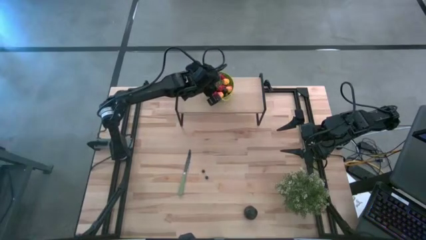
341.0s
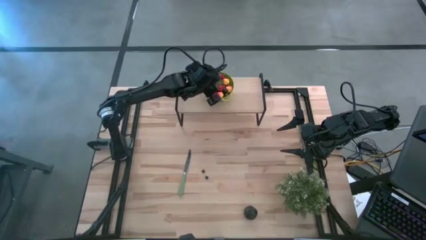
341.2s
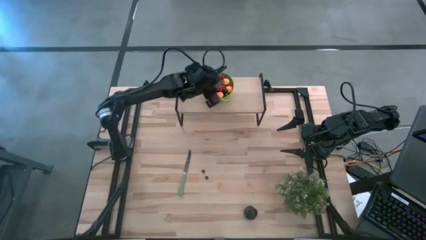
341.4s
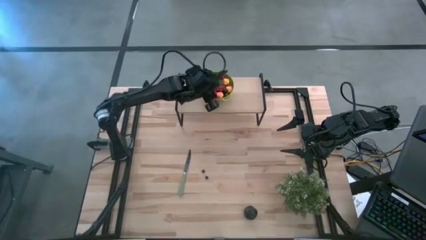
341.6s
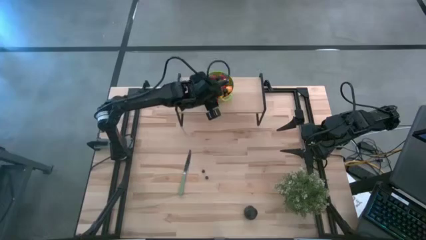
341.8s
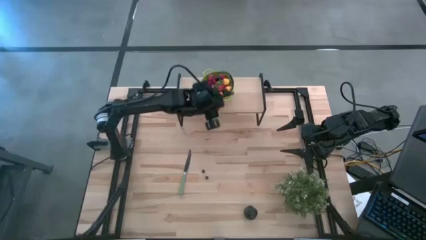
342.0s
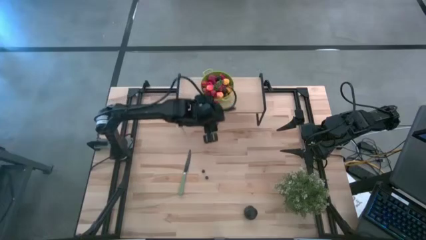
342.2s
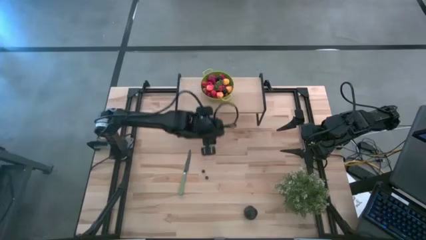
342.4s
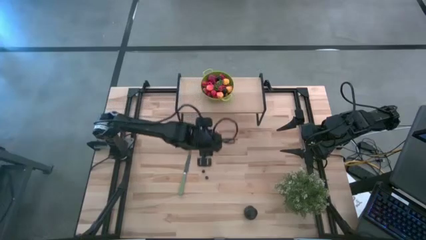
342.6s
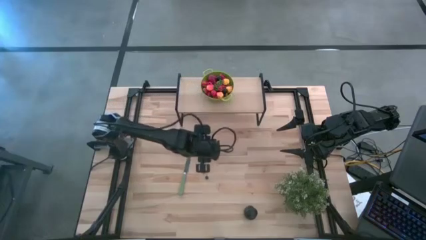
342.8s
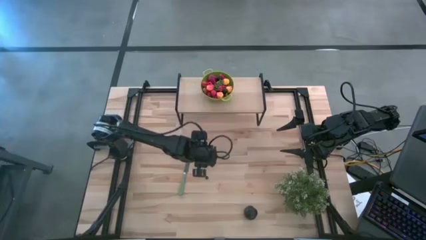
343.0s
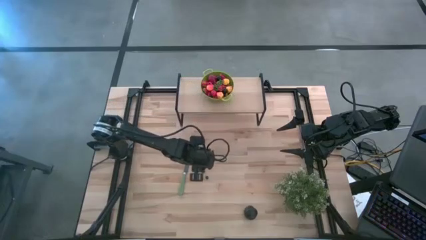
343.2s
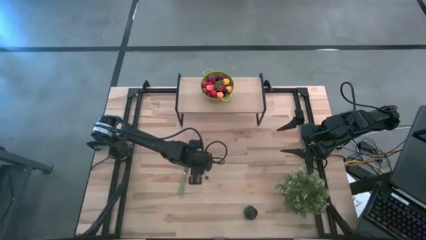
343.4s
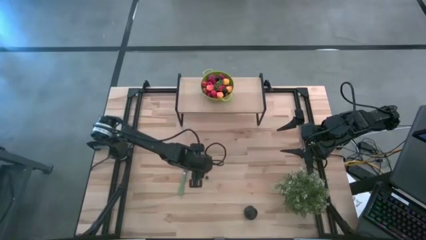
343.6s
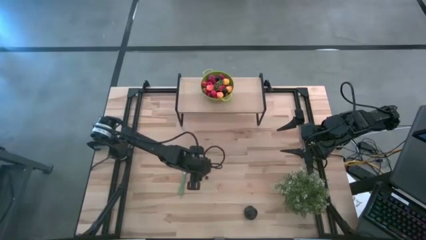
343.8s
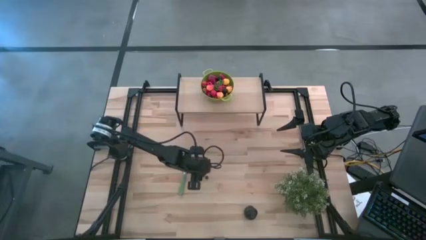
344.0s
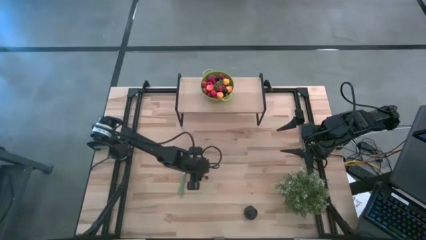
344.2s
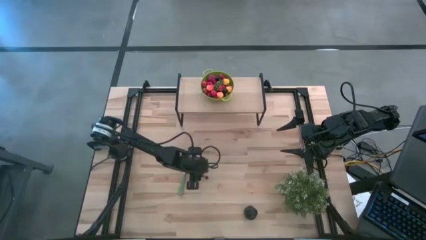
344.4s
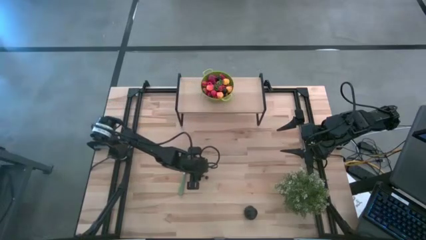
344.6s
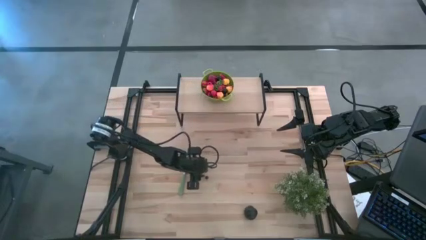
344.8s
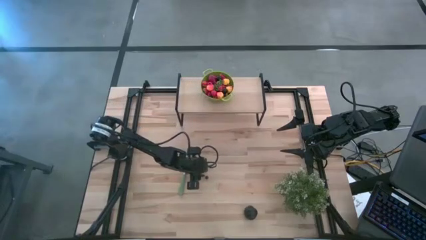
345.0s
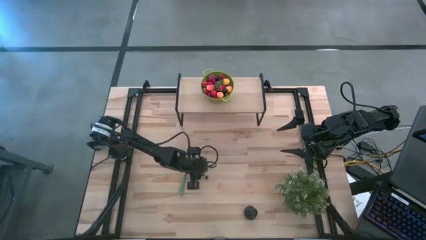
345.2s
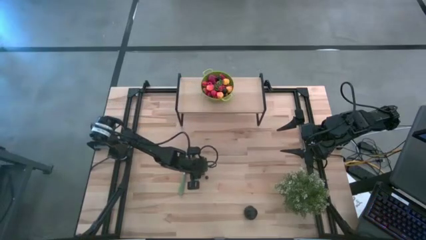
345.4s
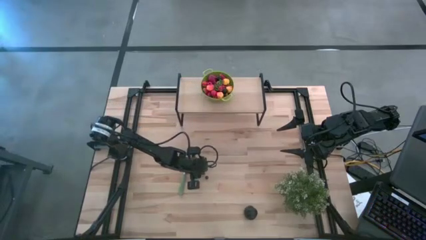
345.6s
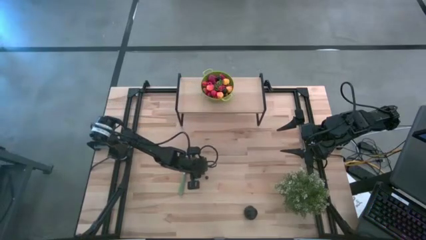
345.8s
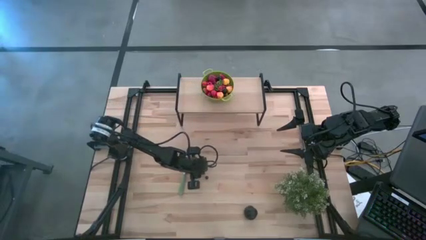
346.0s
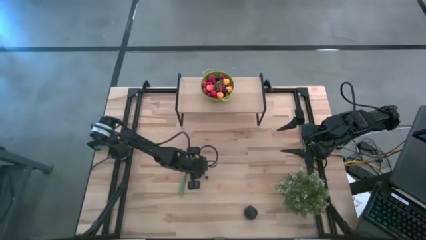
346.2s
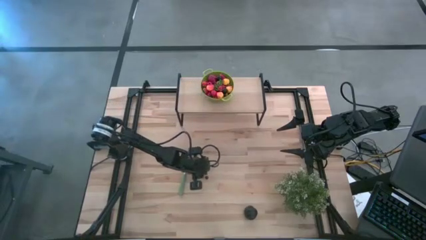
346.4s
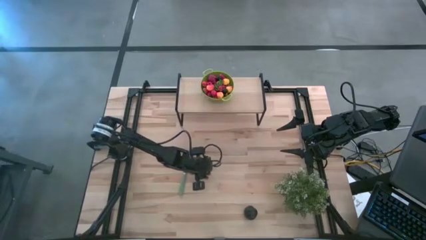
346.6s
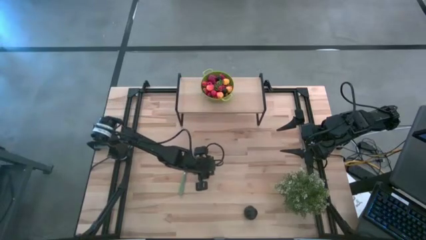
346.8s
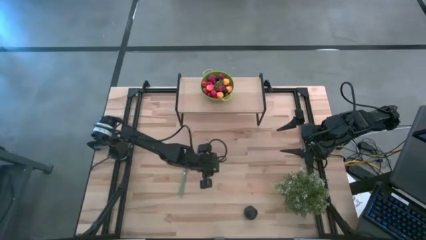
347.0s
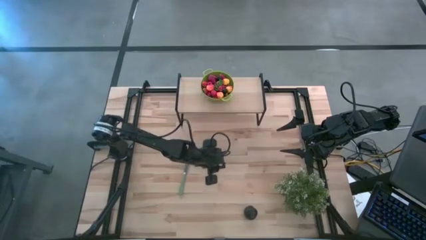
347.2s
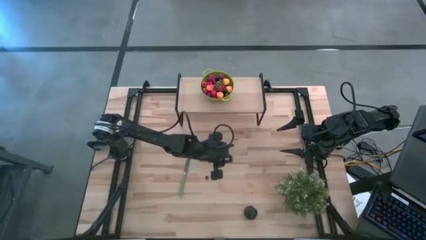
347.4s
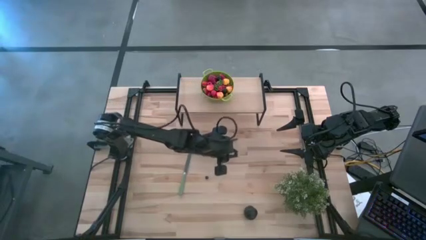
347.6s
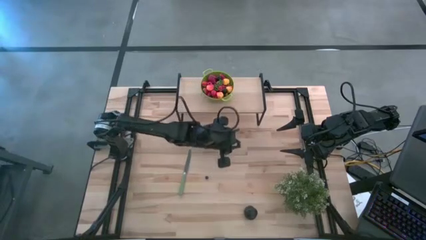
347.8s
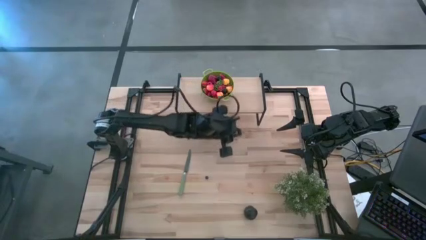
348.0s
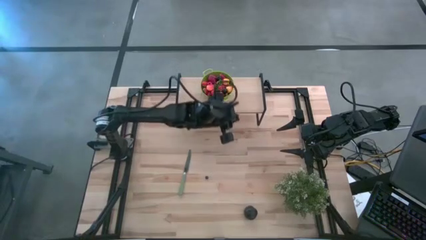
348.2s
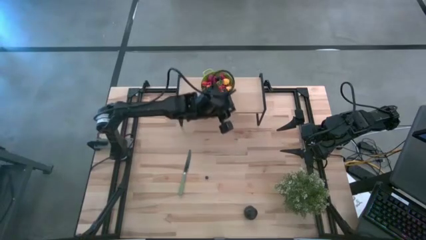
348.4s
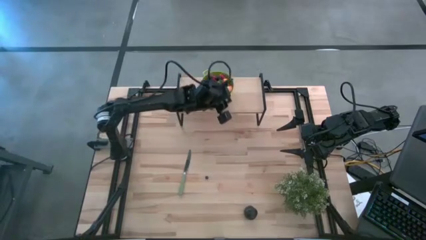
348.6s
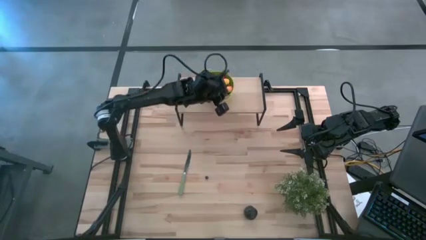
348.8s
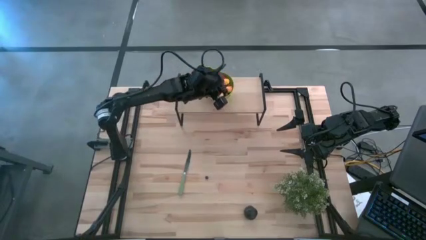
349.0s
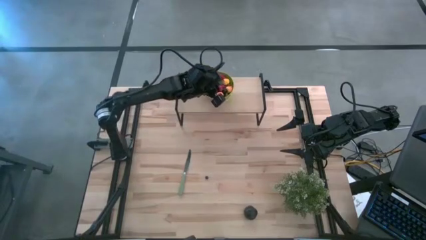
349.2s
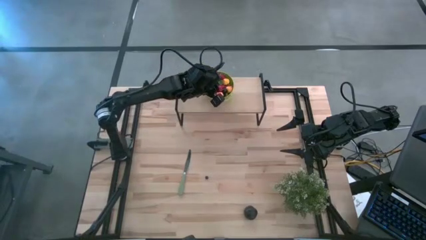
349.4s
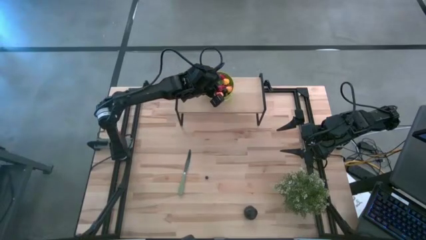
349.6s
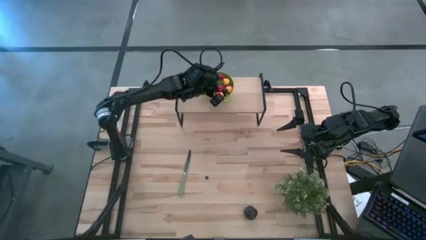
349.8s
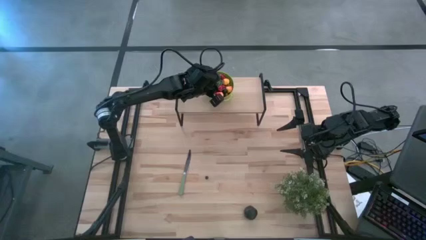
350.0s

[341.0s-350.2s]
Task: Pick & Place Fruit
Put the blueberry into the green colander on the shelf

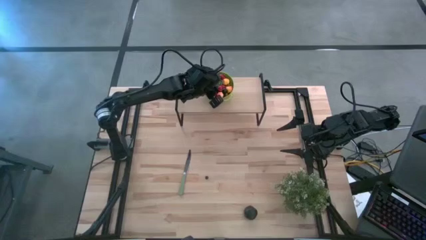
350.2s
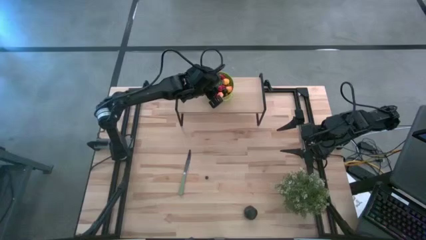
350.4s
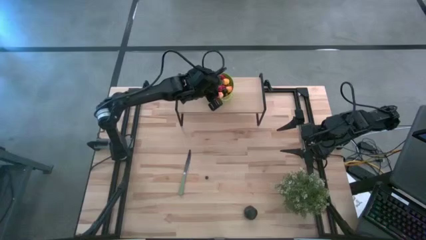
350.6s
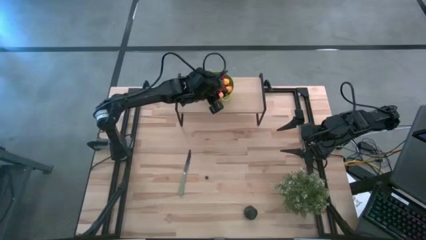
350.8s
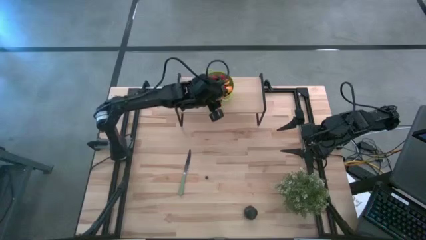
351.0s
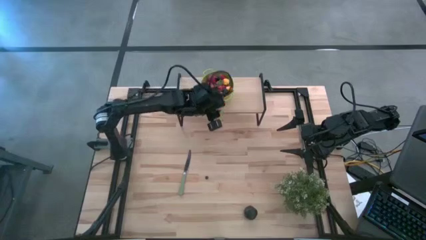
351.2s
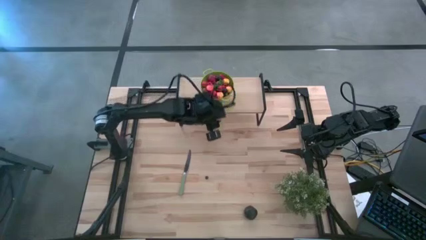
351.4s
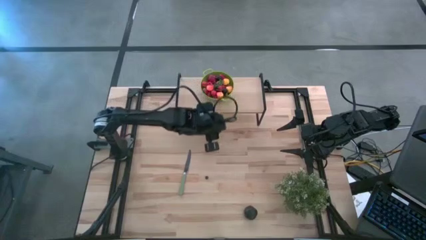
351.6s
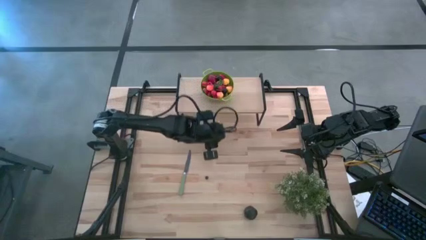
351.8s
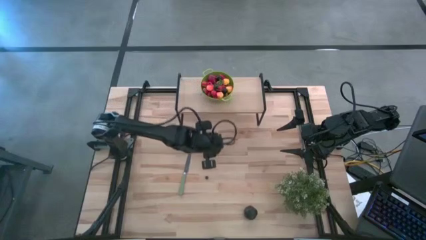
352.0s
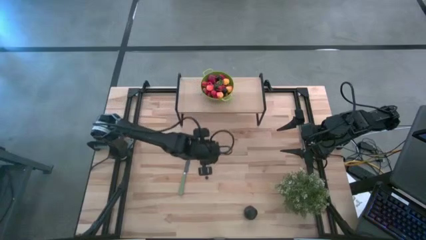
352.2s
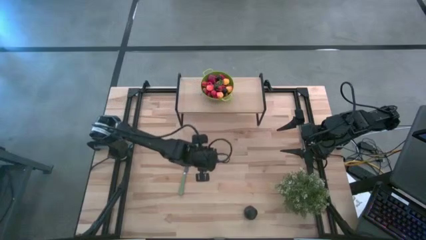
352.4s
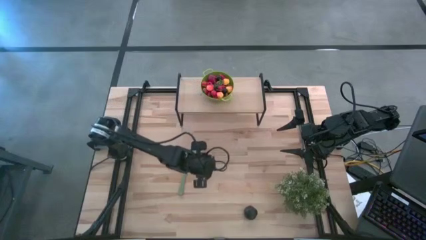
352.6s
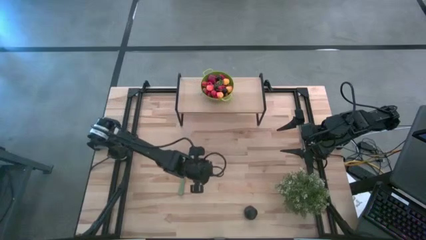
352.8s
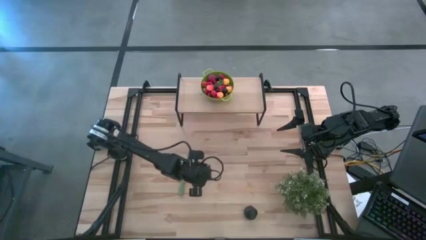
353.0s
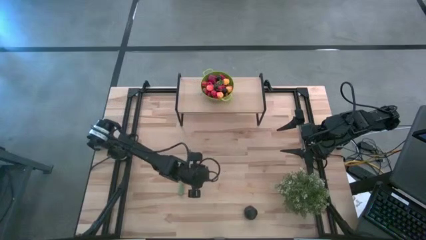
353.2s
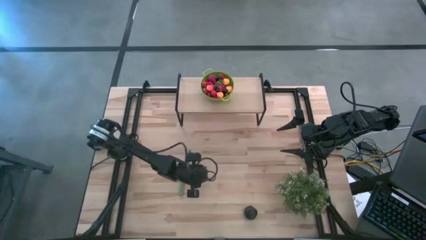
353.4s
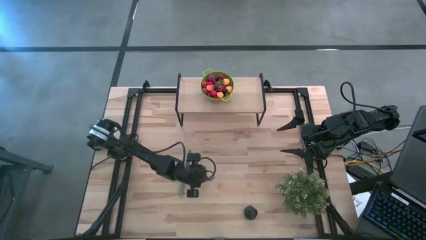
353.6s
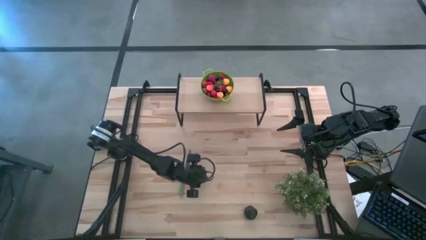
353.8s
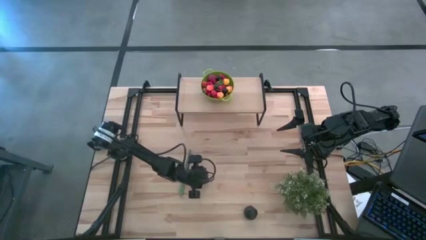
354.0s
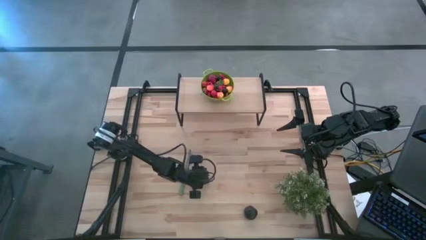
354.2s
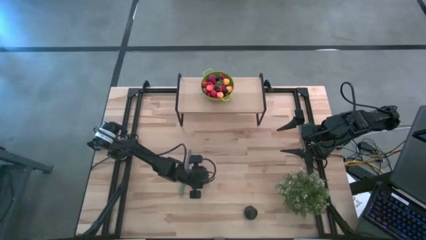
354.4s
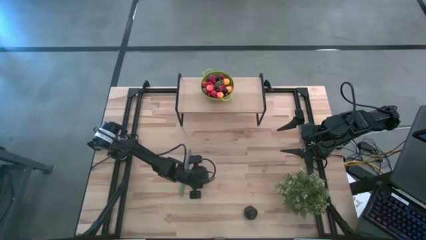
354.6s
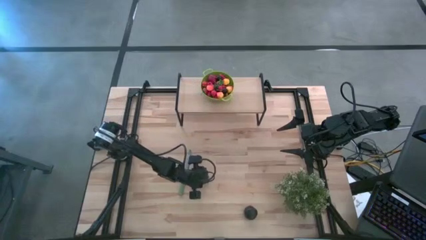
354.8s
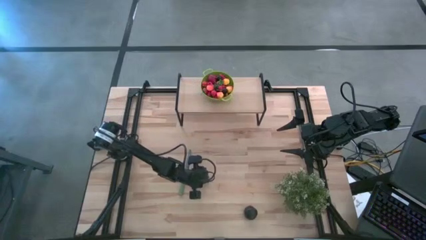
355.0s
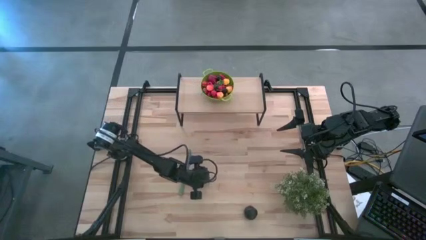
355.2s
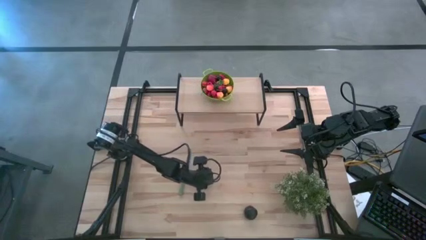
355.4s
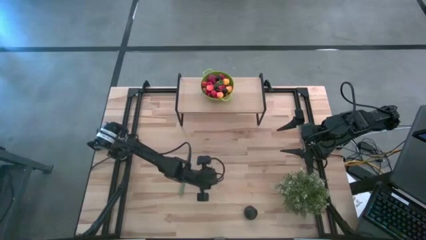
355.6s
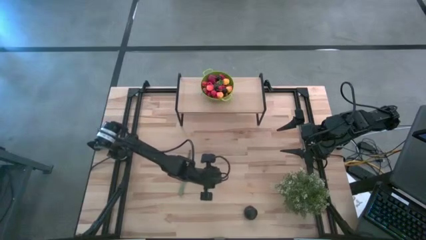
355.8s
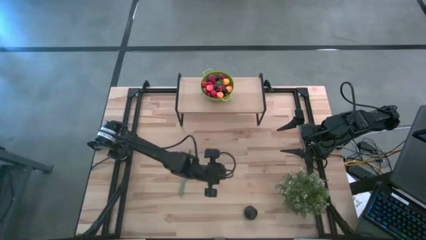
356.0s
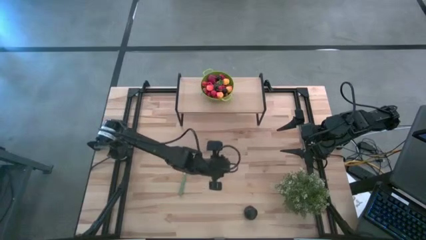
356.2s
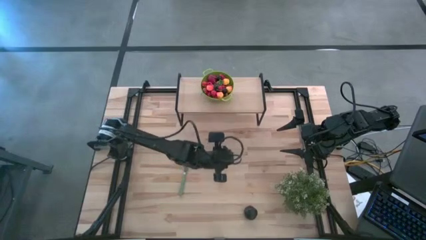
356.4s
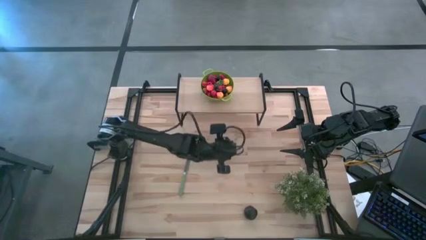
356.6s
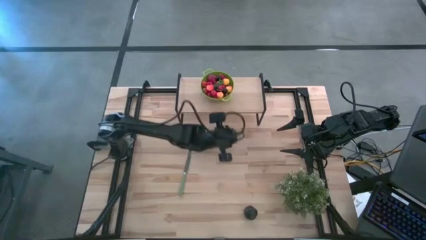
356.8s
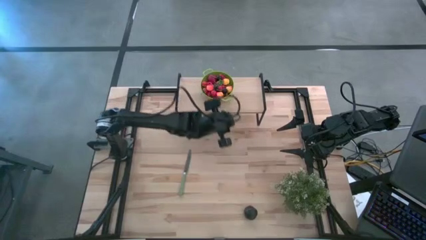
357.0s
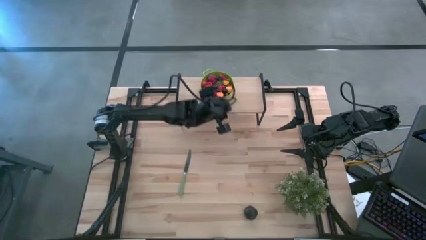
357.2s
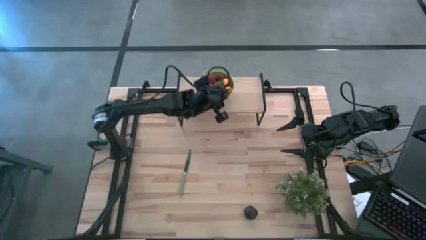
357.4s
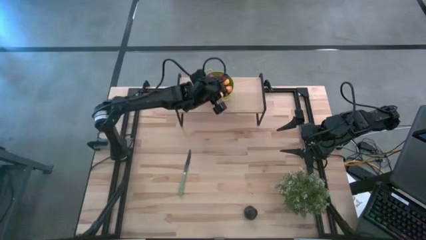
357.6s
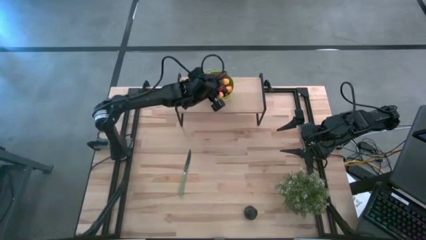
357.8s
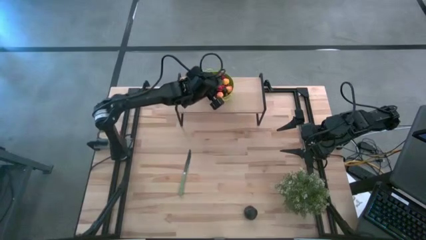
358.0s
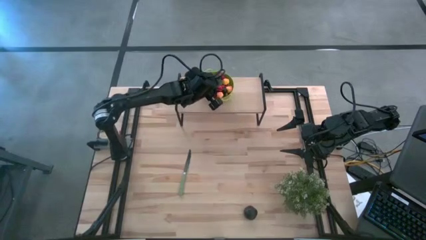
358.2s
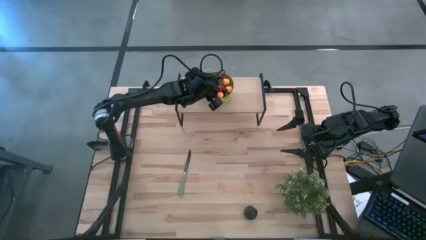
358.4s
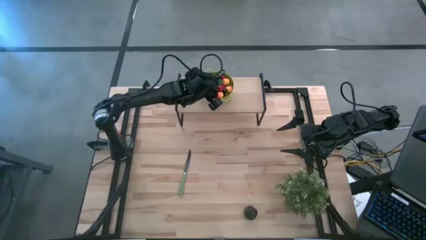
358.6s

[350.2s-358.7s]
Put the blueberry into the green colander on the shelf
